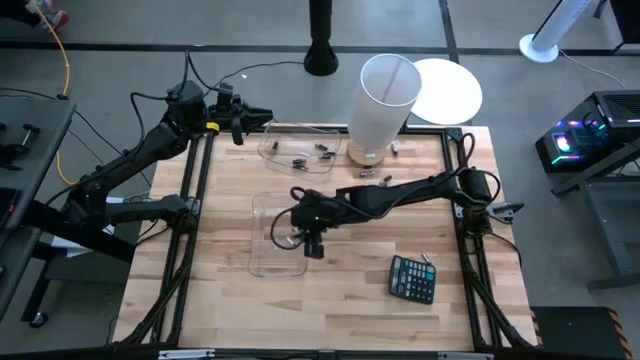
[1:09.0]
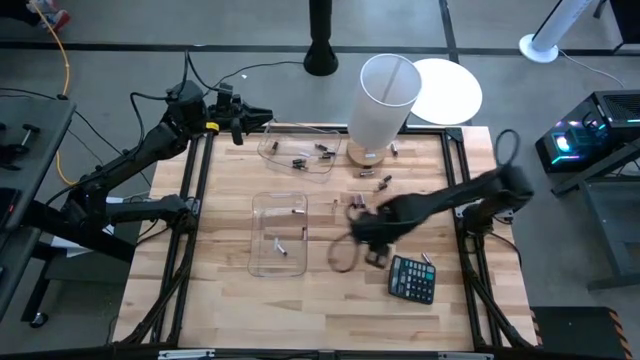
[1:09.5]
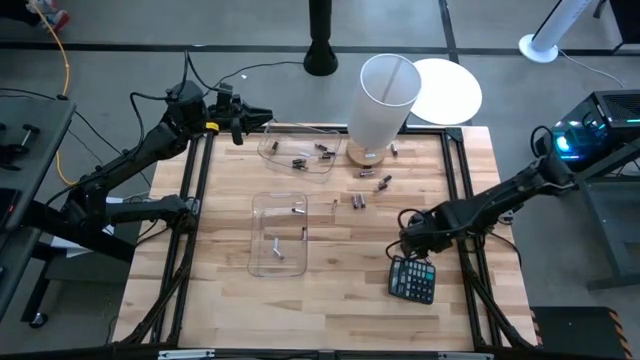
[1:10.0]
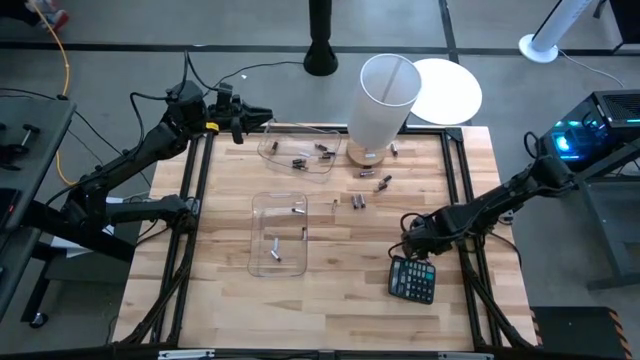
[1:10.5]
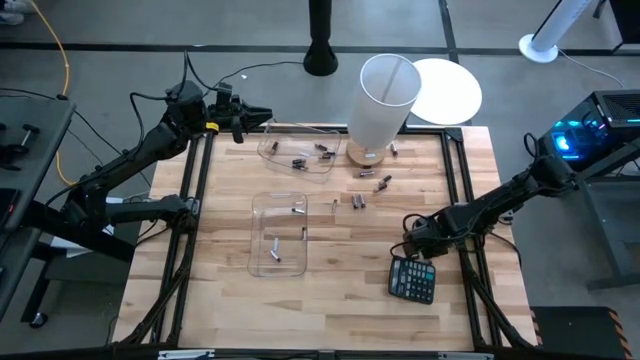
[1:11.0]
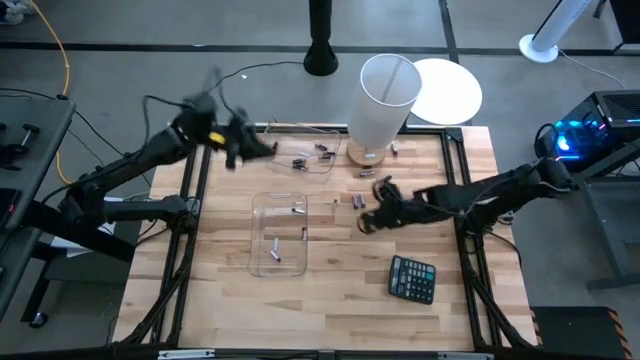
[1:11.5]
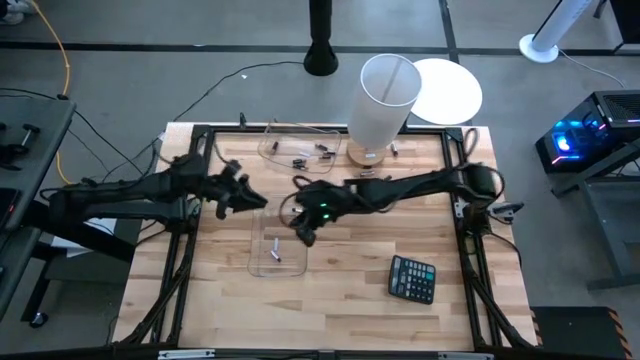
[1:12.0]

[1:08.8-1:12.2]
Task: Sort batteries
Put the white battery into the bottom transparent bin

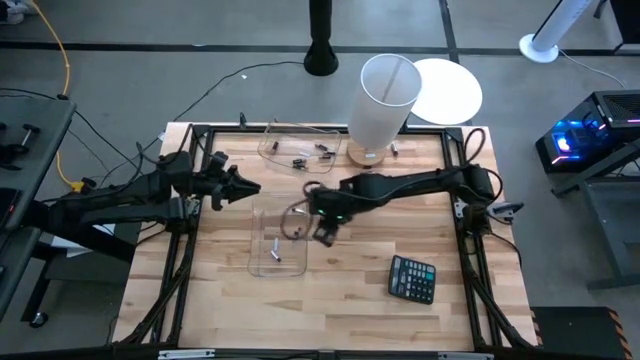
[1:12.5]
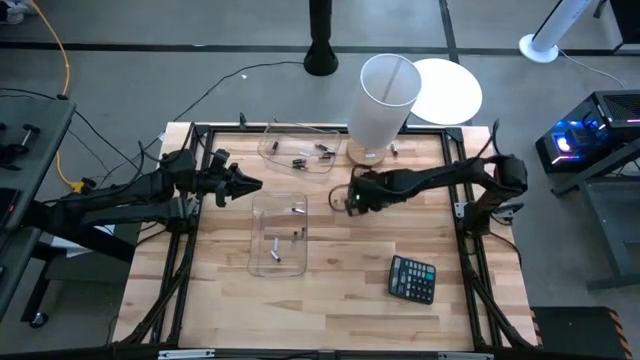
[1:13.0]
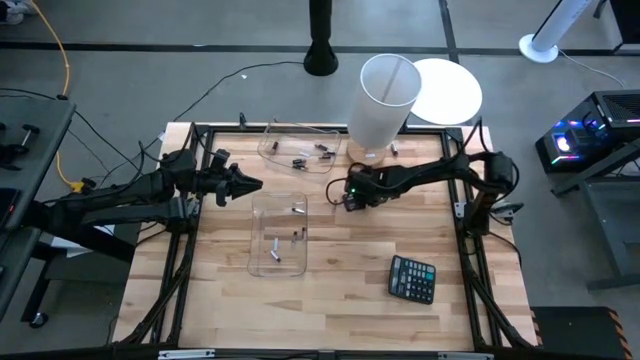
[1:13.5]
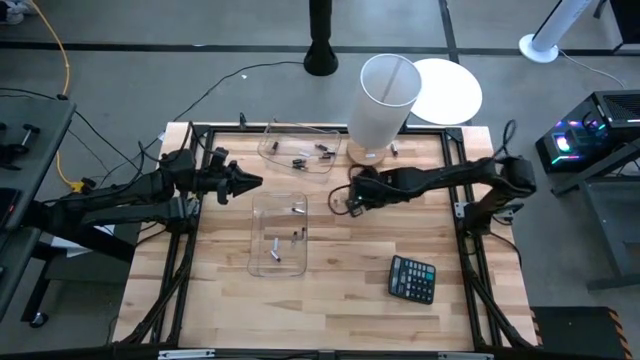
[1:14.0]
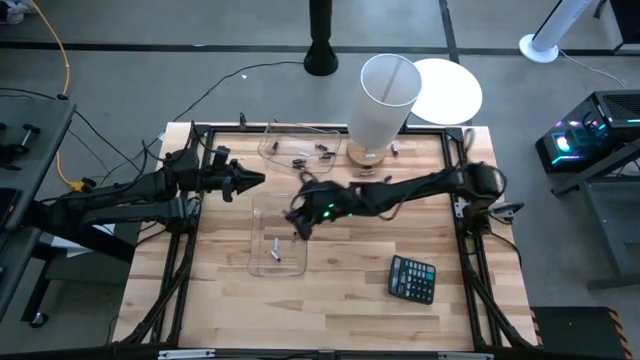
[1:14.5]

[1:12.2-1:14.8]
Put the white battery into the bottom transparent bin

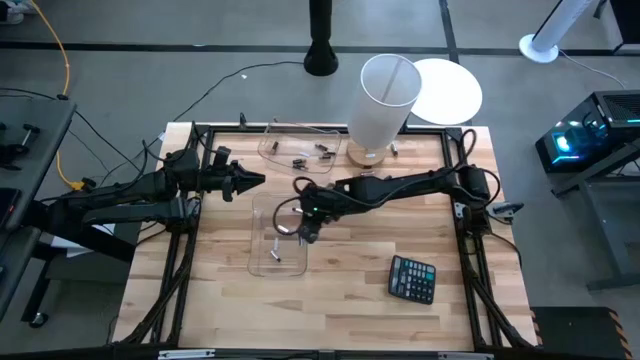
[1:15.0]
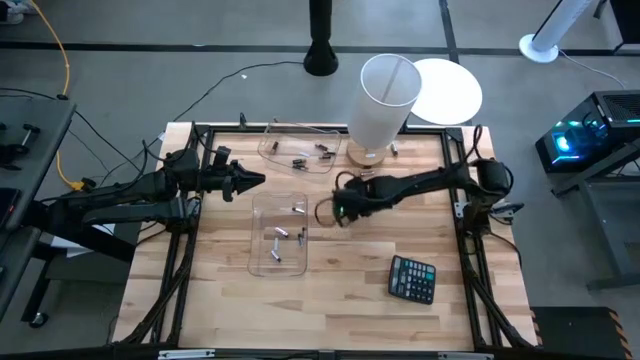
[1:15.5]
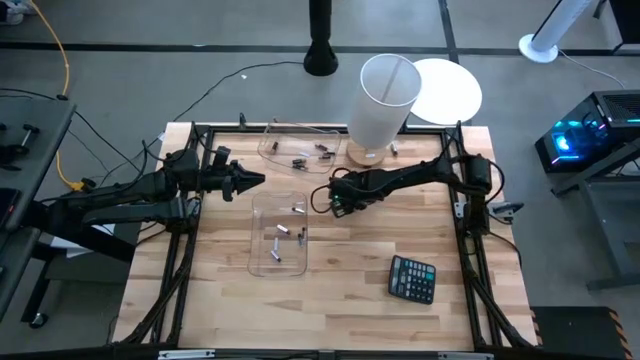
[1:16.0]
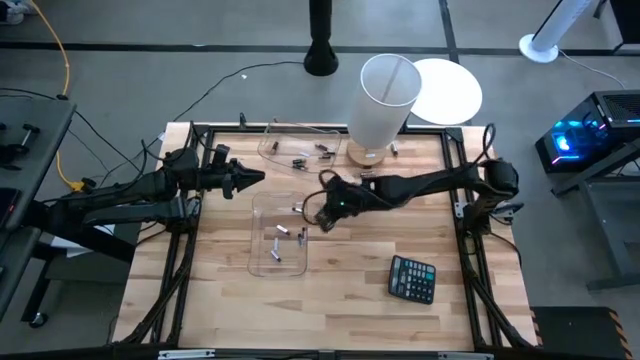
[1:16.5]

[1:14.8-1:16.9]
Put the white battery into the bottom transparent bin

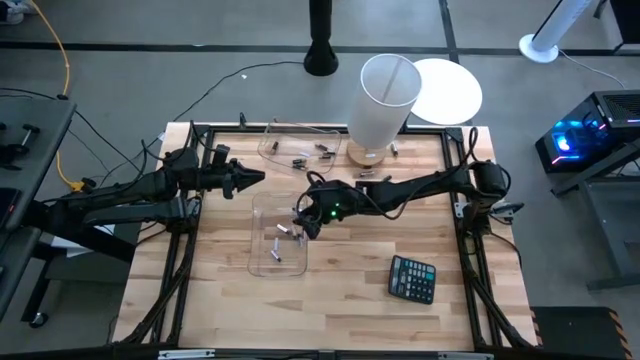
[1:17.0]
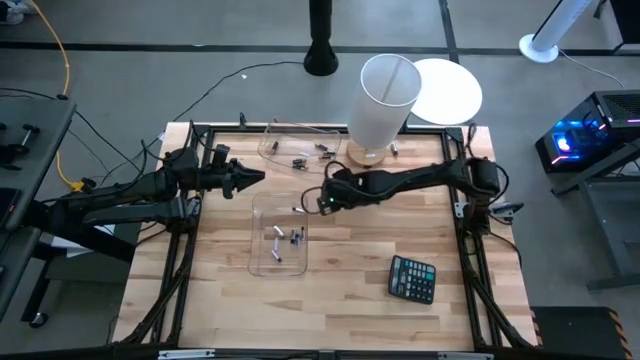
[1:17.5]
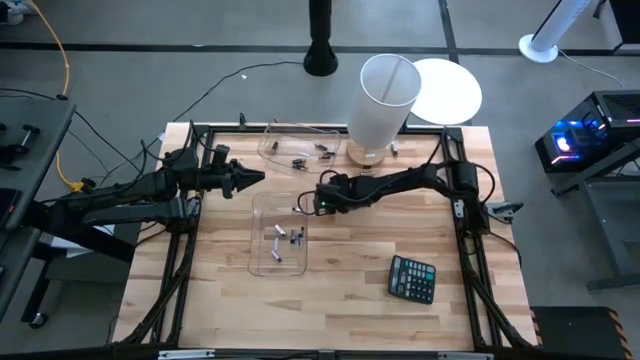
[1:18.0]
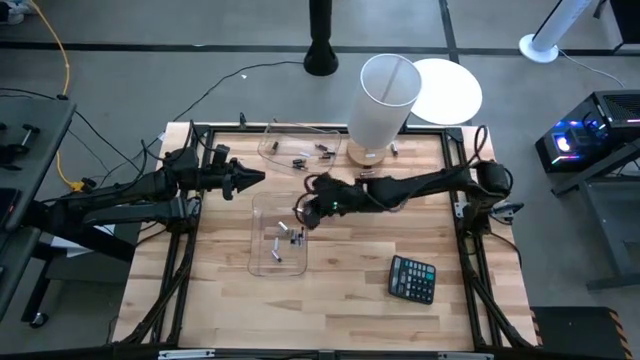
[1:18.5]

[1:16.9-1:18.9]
Put the white battery into the bottom transparent bin

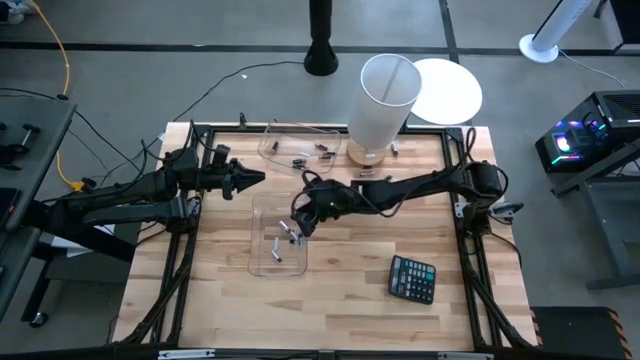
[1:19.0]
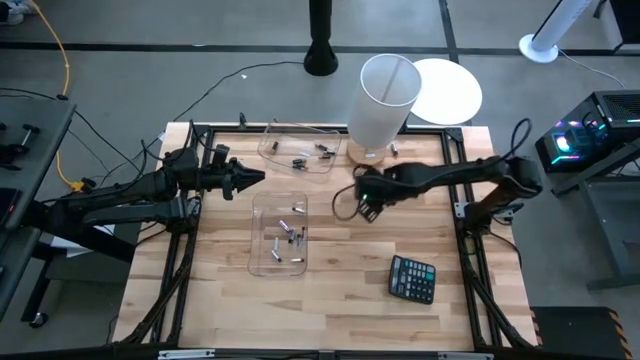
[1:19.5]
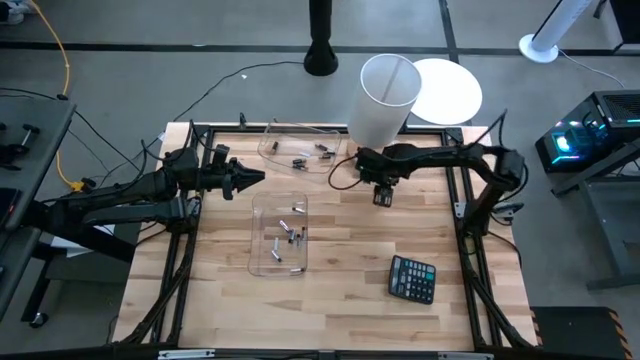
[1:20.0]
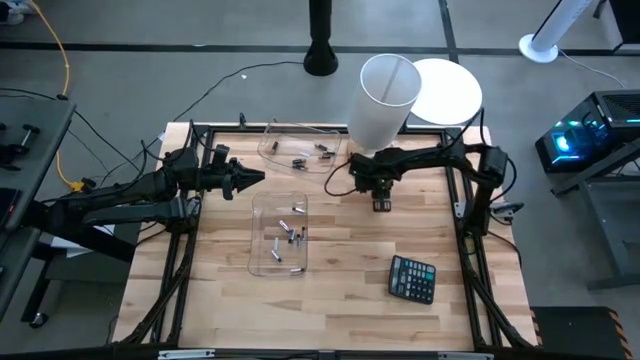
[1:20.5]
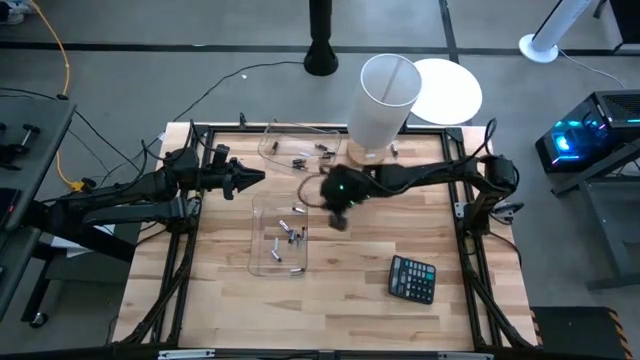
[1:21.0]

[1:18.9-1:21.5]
Put the black battery into the top transparent bin

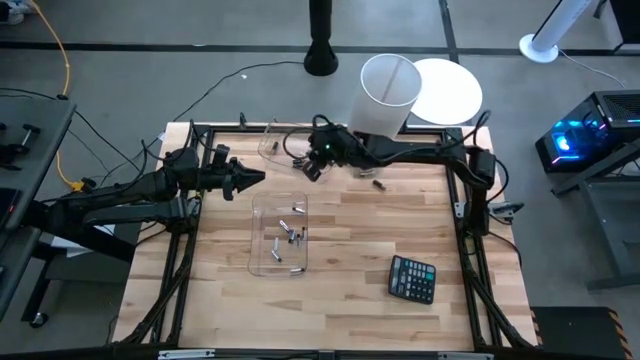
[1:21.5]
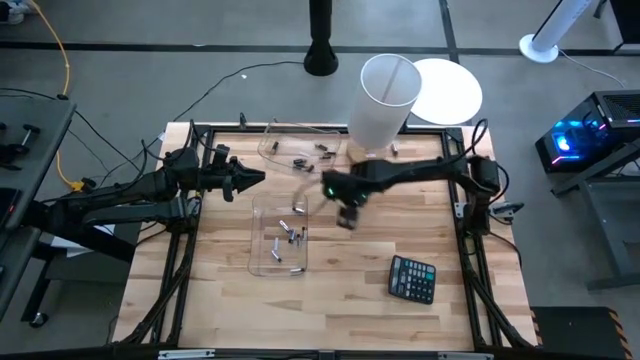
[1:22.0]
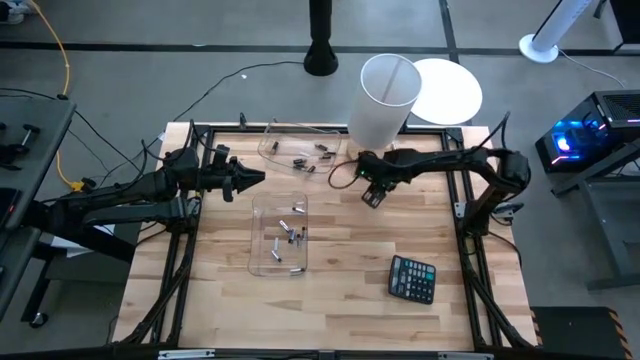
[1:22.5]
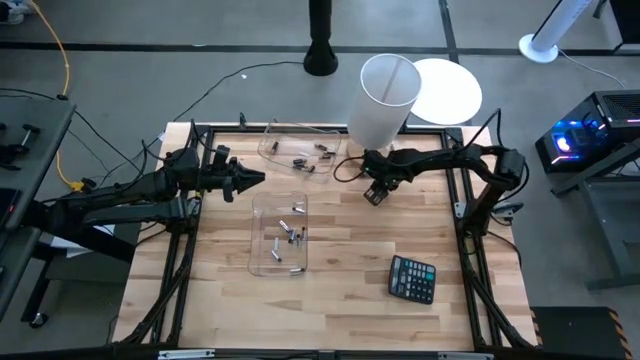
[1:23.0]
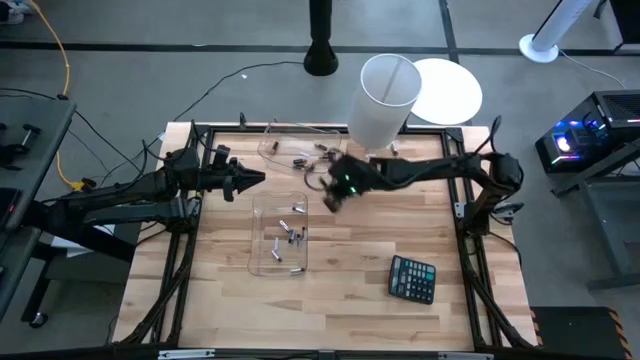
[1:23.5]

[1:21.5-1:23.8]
Put the black battery into the top transparent bin

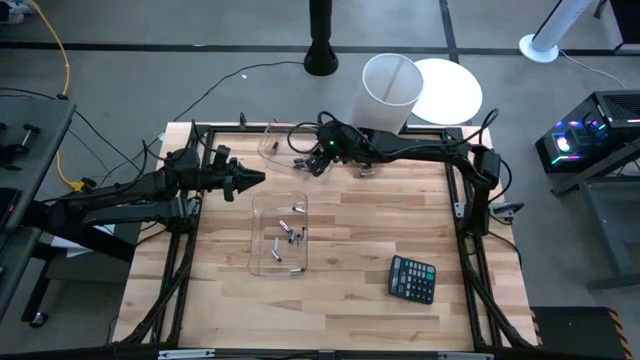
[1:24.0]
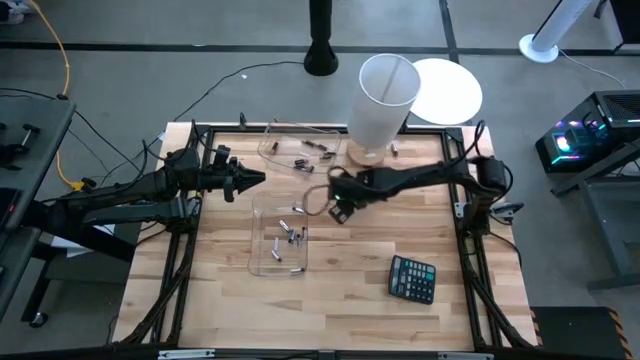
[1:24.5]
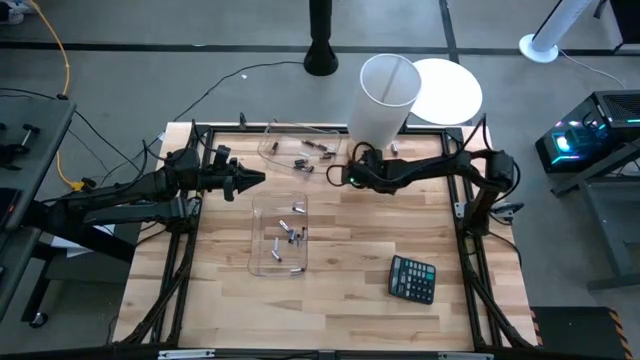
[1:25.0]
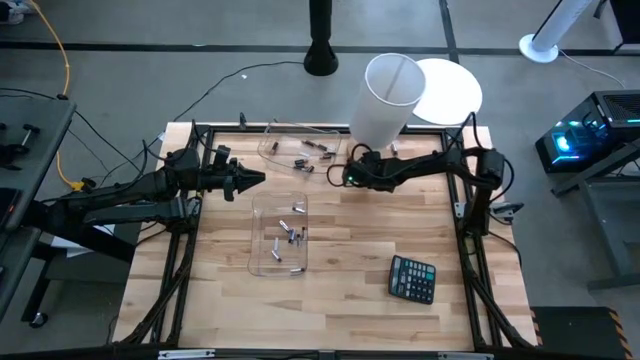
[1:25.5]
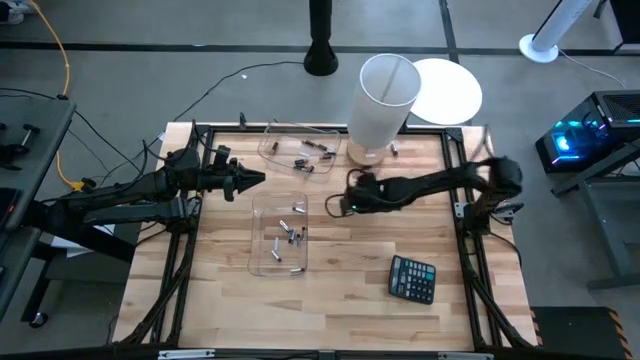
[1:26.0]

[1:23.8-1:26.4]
Adjust the white battery

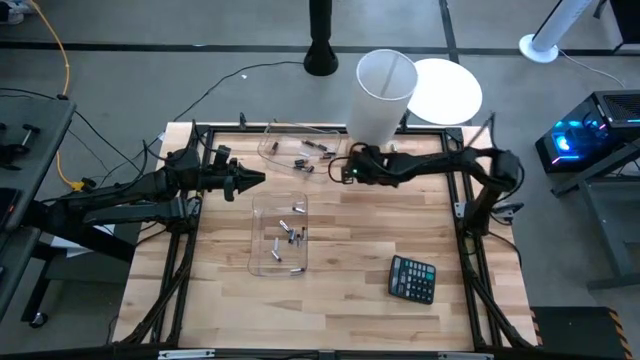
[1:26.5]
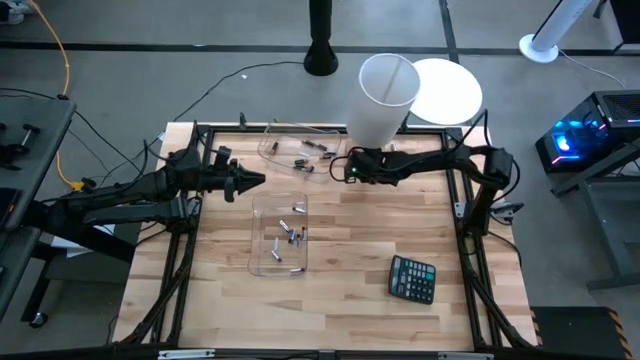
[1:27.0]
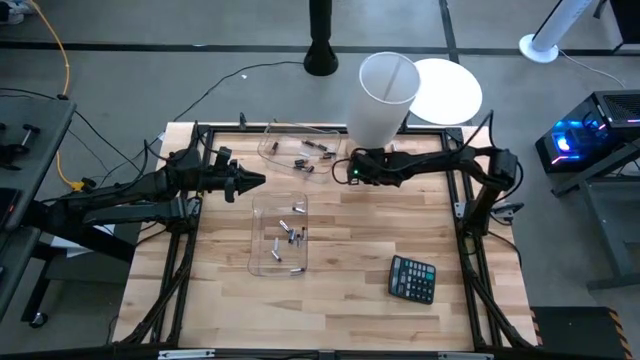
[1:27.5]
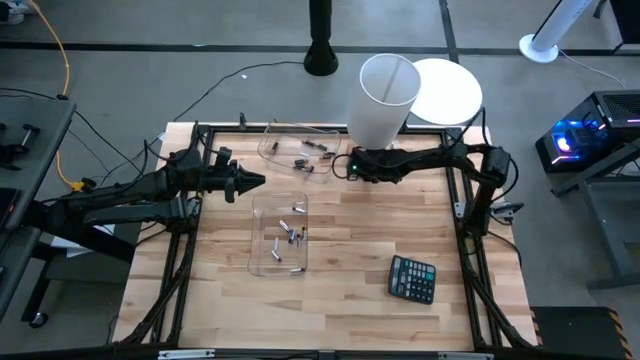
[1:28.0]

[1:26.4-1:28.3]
Adjust the white battery

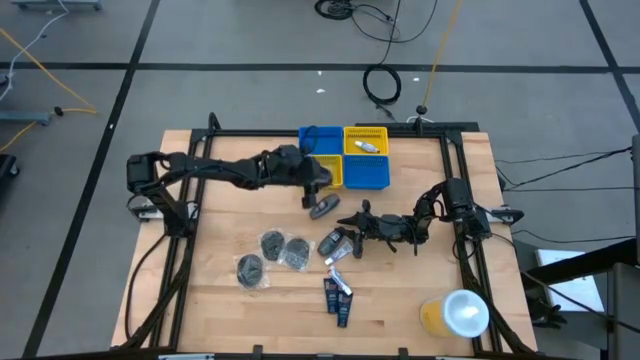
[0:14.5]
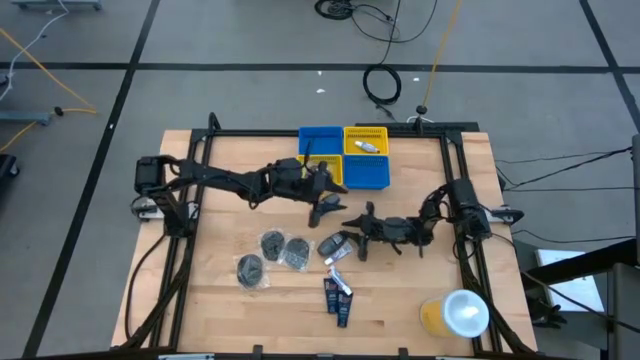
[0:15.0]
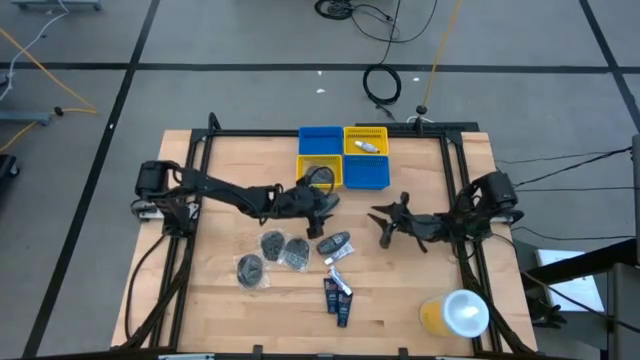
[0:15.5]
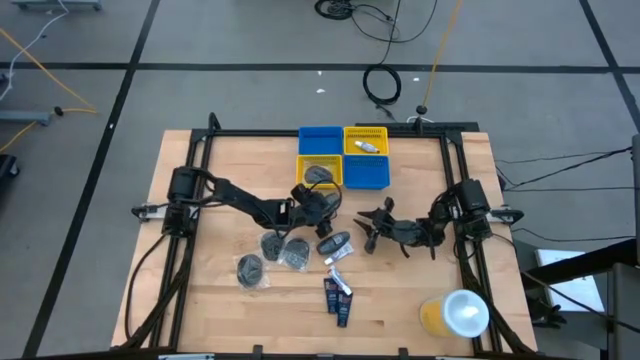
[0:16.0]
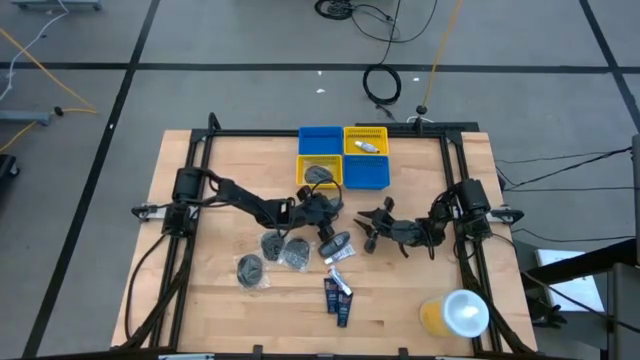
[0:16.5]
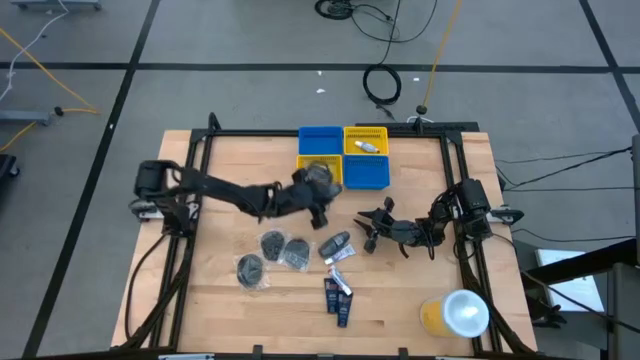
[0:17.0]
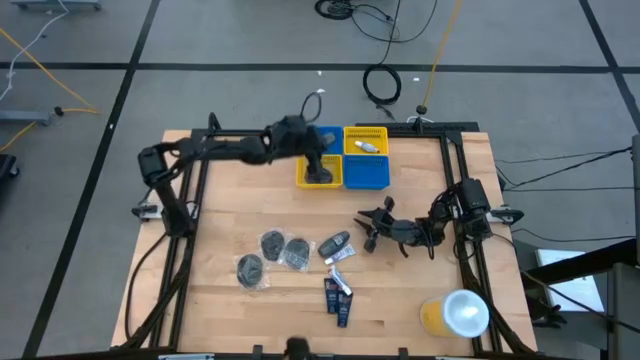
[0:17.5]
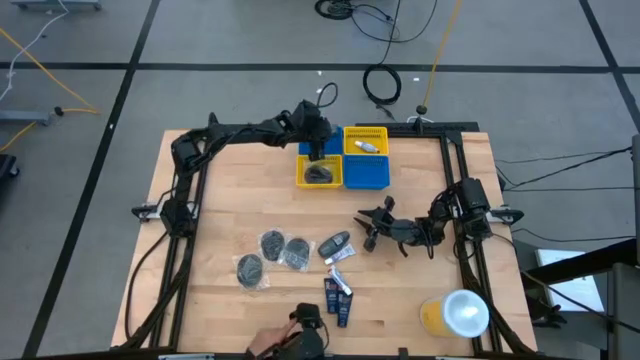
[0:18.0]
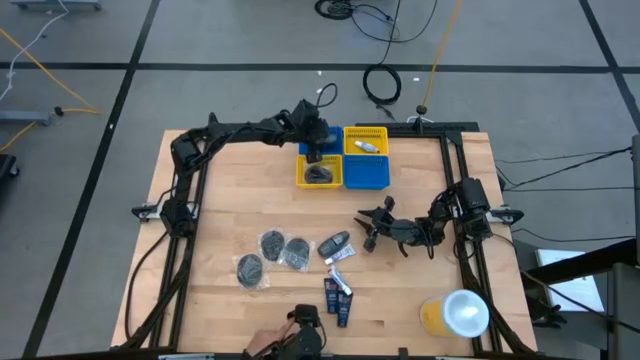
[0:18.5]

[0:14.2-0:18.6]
Task: Pick & Place Travel size toiletries
Put the gray deodorant into the left blue bin
